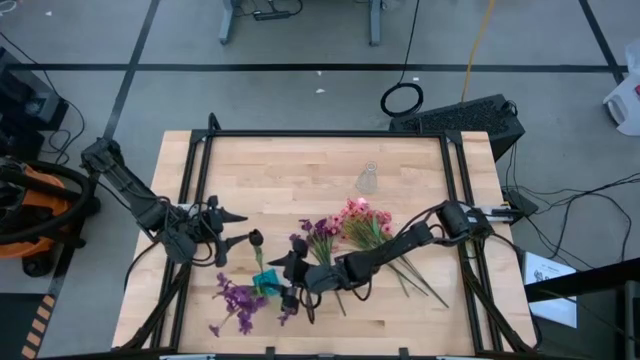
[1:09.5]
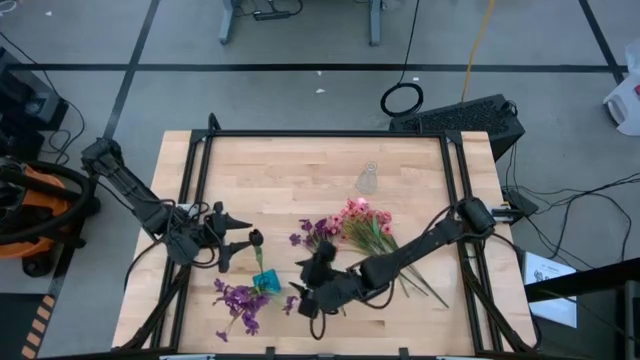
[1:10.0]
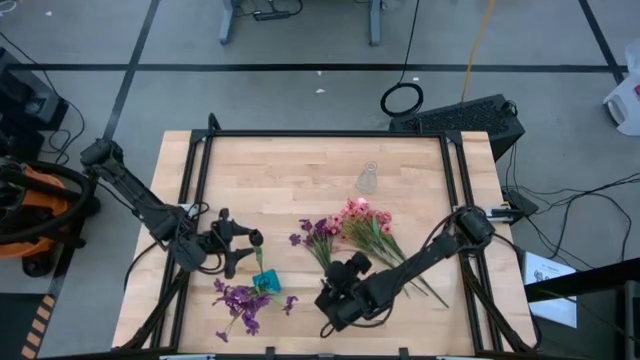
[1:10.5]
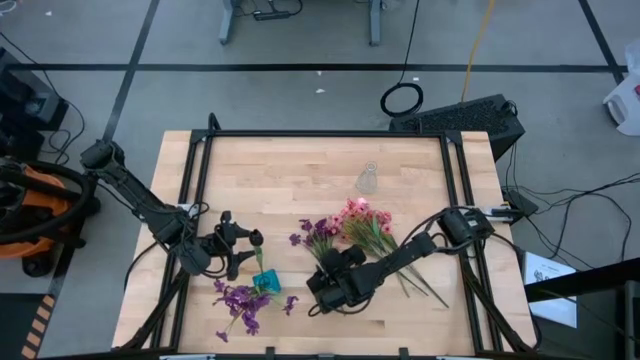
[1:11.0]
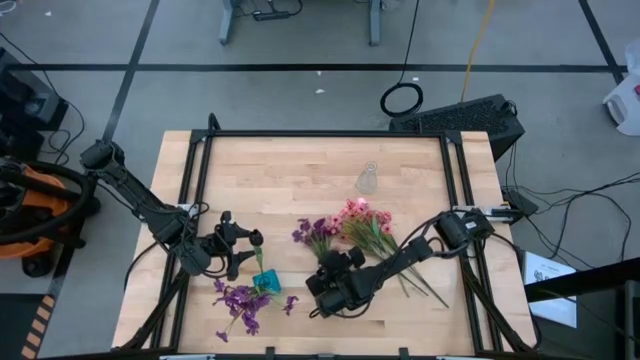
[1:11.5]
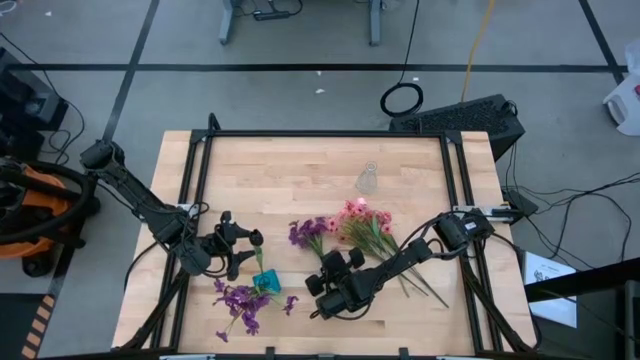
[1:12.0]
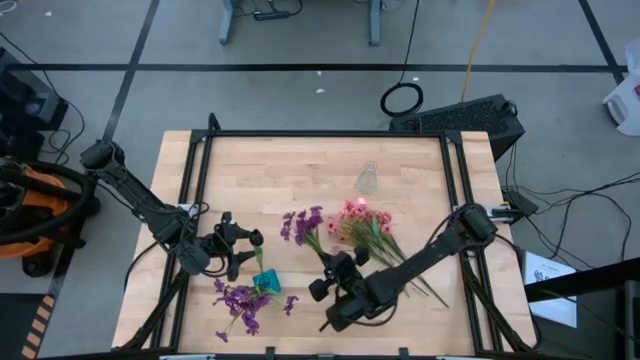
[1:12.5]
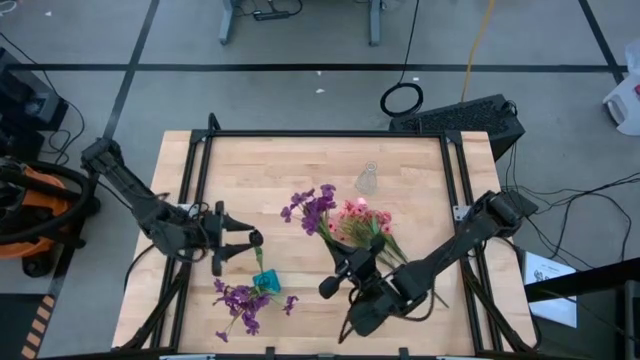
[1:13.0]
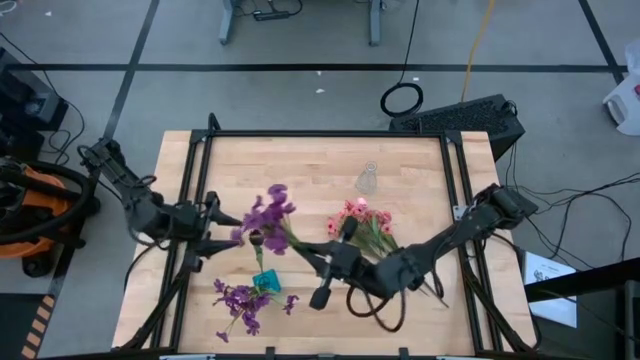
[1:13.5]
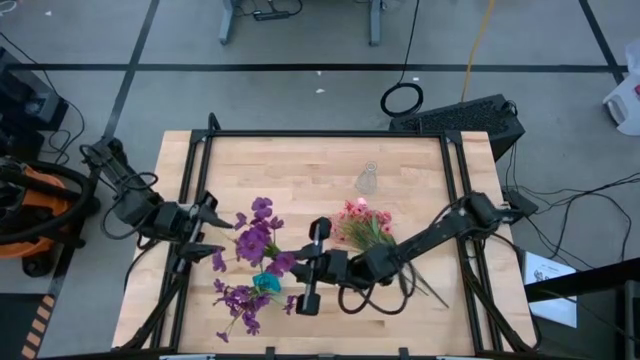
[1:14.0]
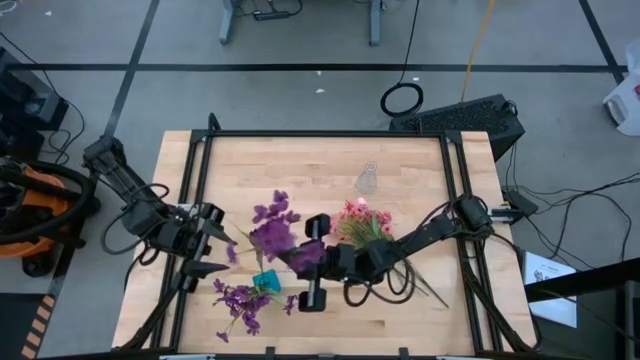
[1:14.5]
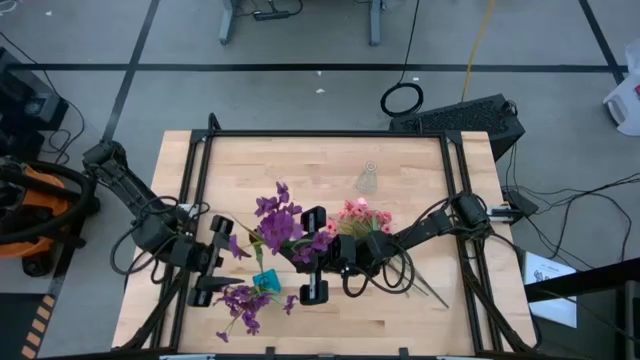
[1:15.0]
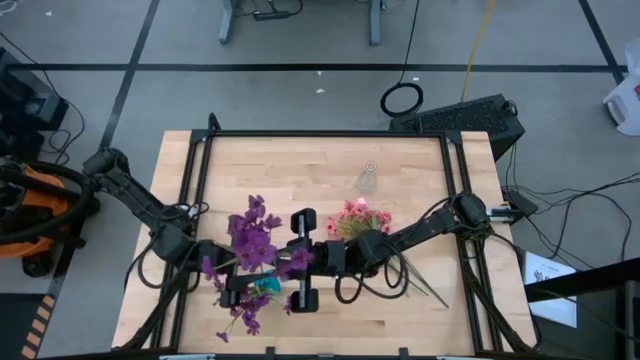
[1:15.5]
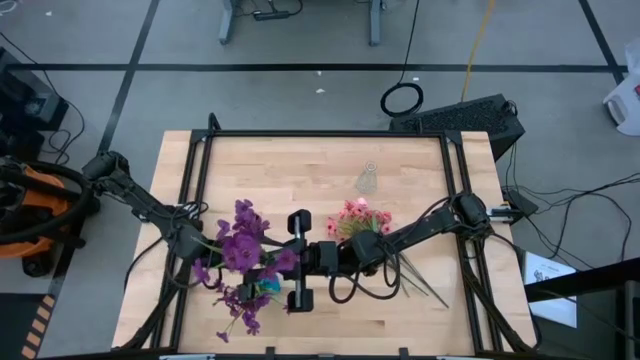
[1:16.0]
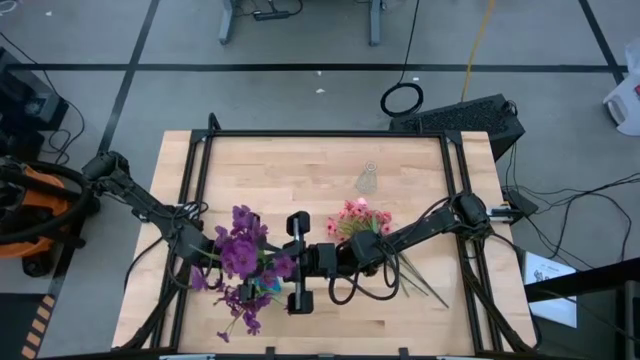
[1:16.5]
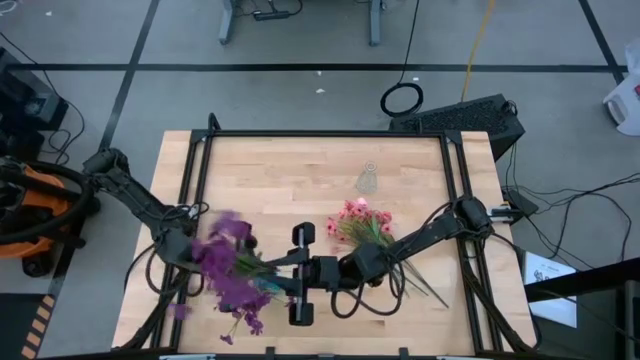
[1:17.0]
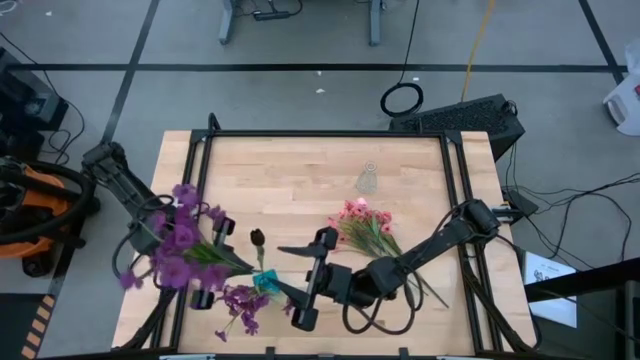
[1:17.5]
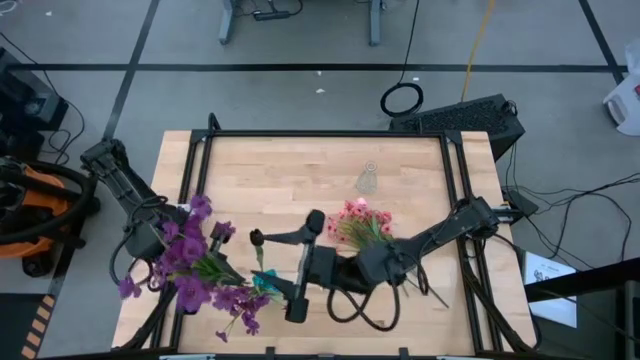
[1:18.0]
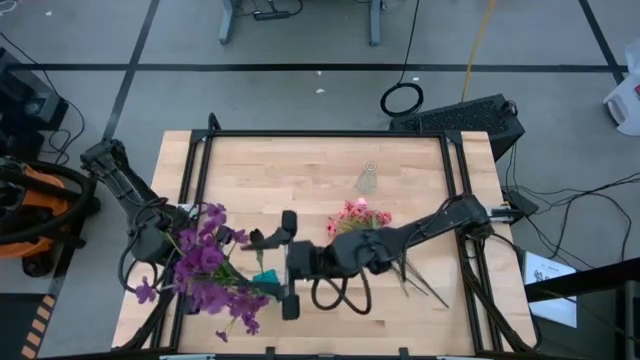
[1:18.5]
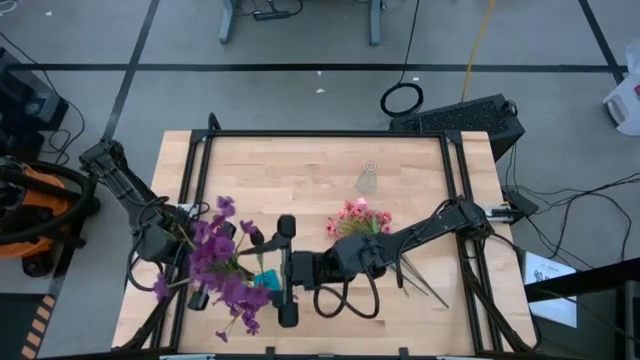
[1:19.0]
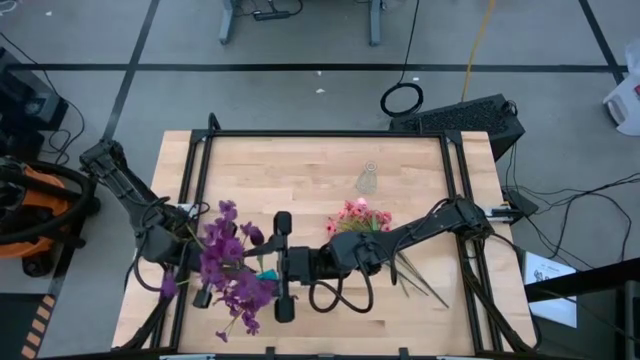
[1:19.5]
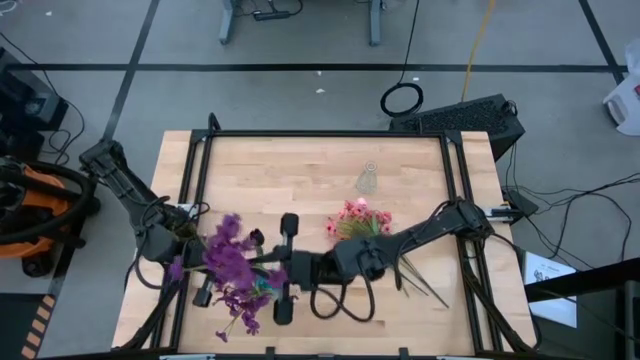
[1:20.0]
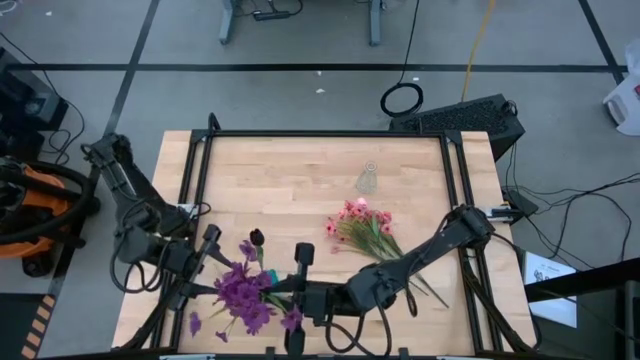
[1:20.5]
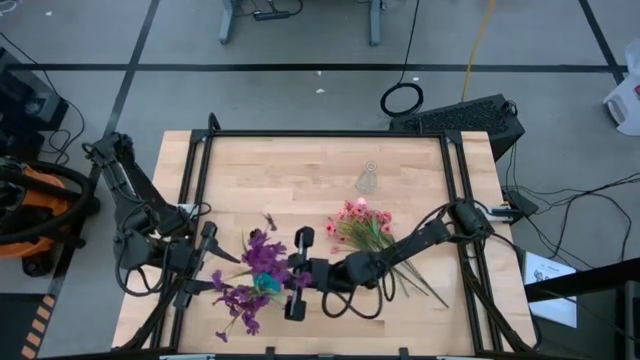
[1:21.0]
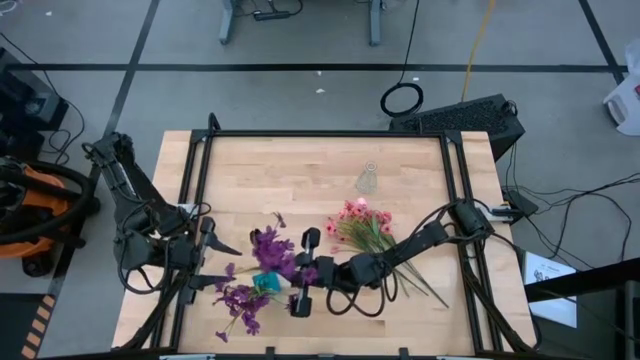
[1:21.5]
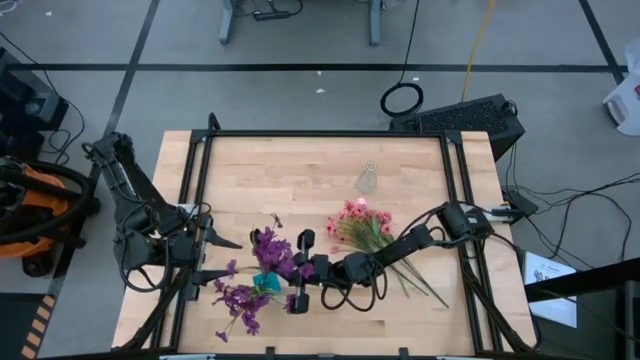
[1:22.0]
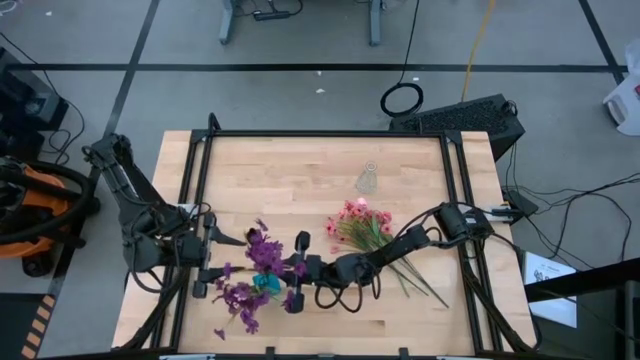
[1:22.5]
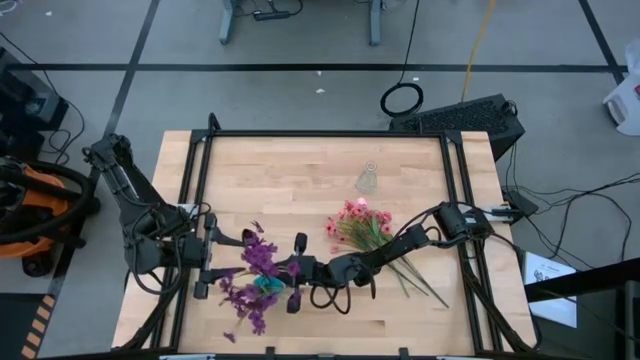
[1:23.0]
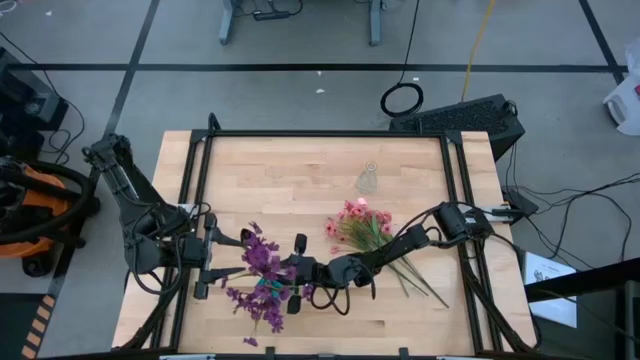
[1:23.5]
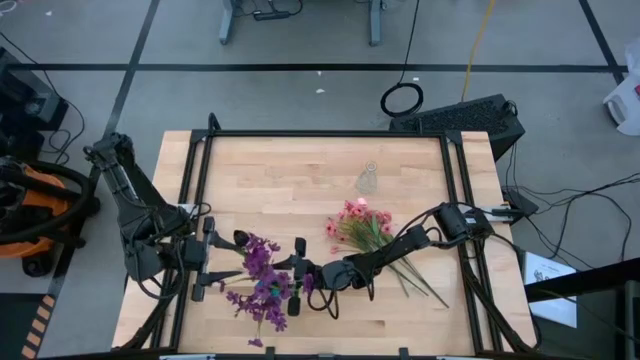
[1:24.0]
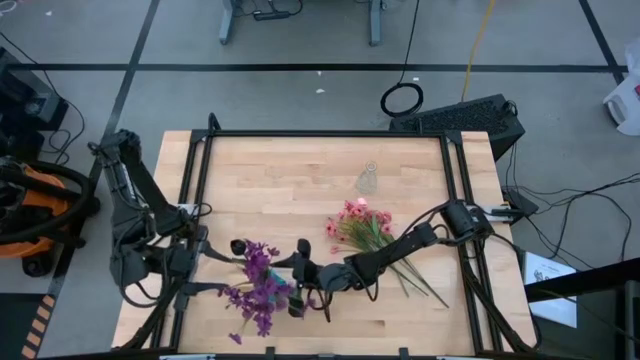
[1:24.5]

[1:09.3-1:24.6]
Task: Sort flowers into vase by color
Put the violet flower into the blue vase

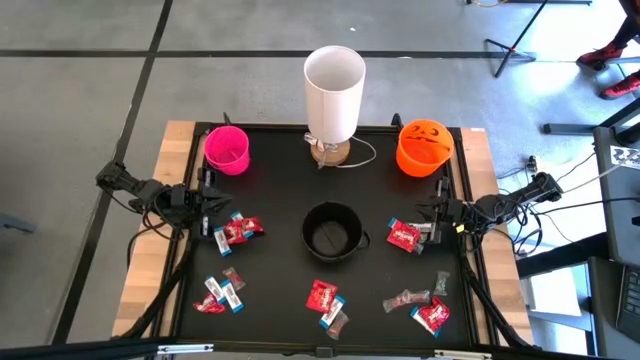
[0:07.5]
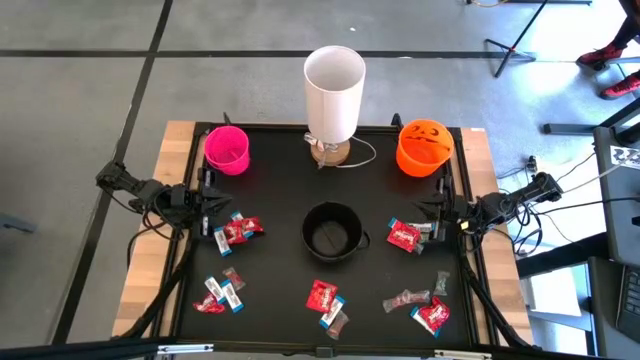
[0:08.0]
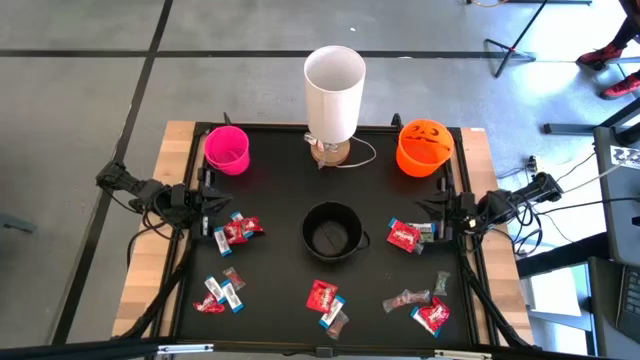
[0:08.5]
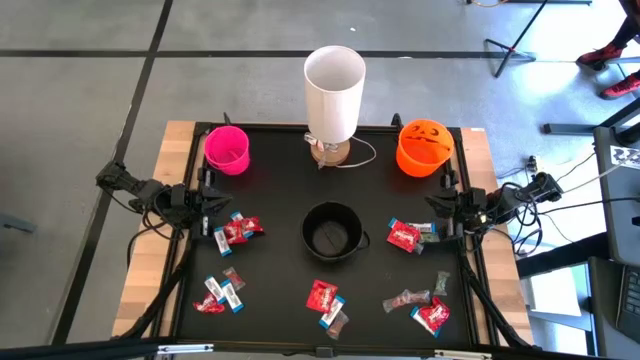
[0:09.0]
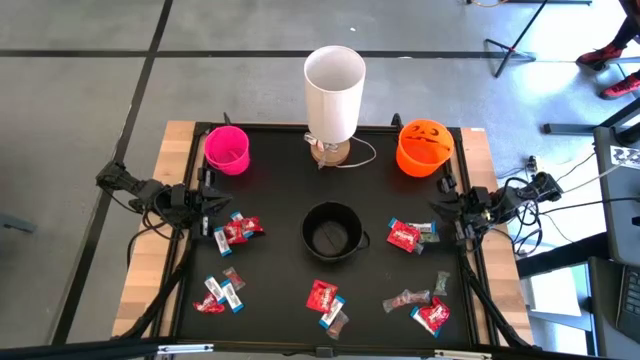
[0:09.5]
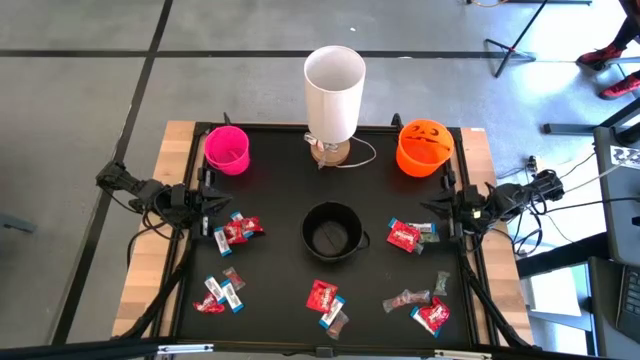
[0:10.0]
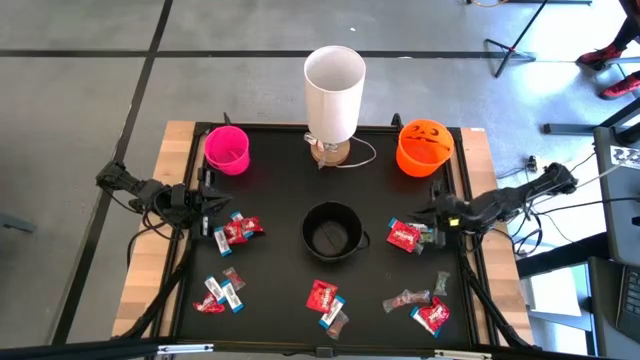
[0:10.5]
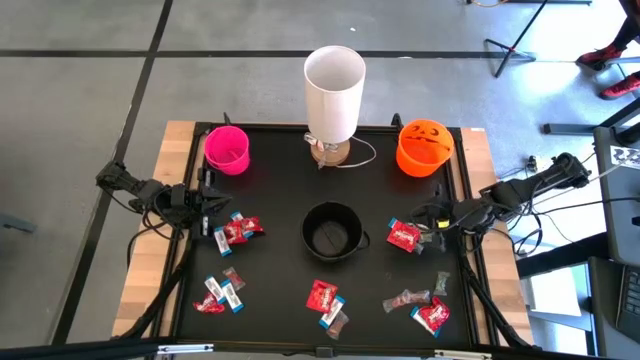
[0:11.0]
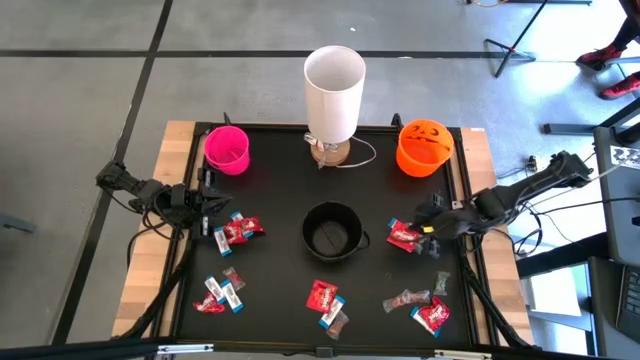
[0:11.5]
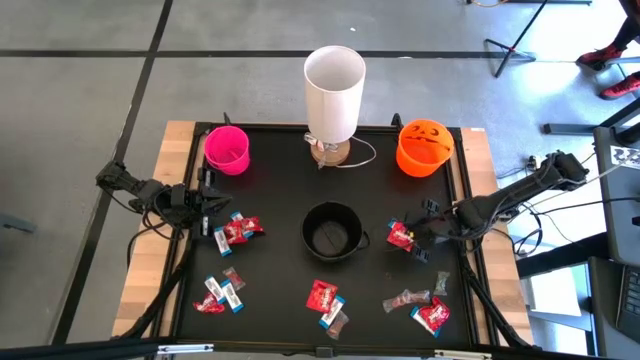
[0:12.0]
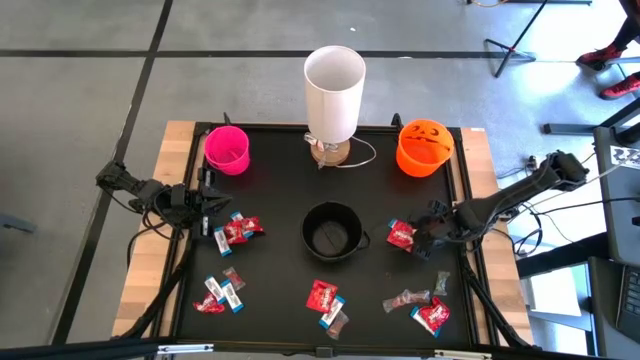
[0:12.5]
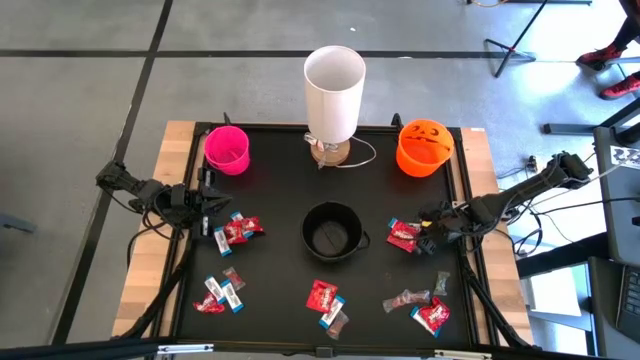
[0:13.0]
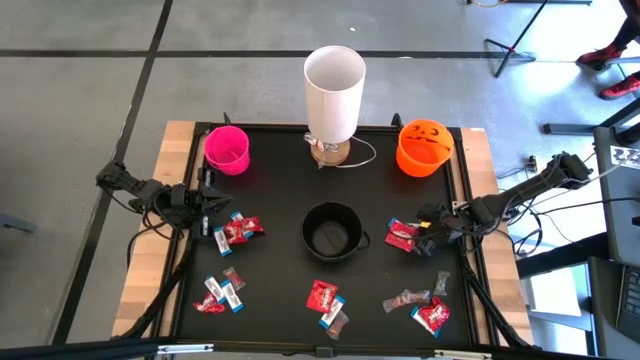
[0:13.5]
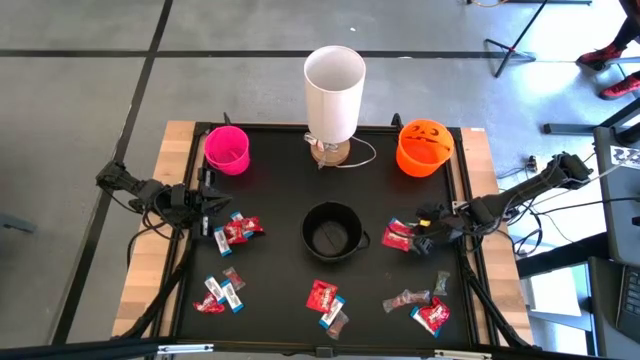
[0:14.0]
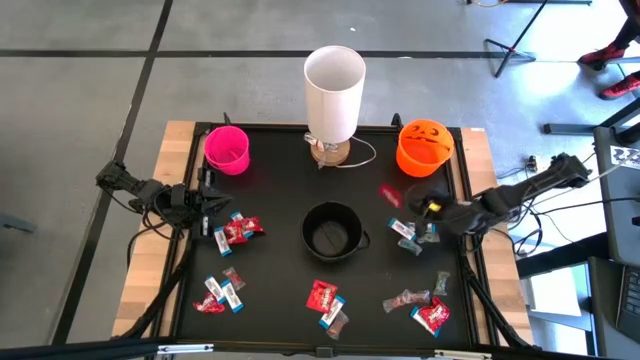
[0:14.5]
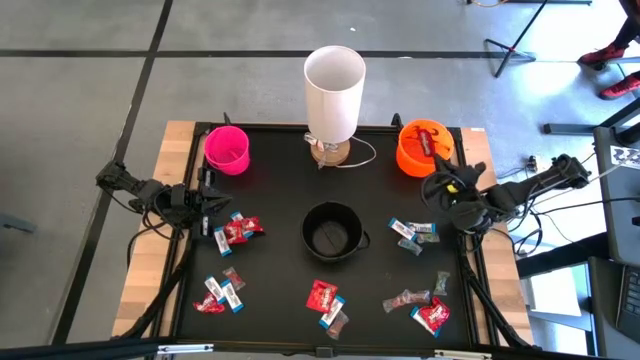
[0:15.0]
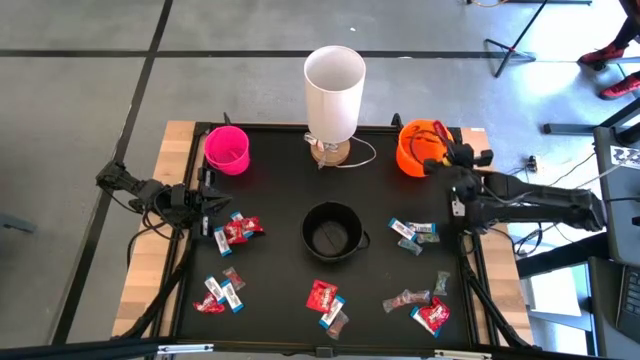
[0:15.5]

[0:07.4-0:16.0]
Task: Sort candy
Put the red candy pack into the orange bucket
